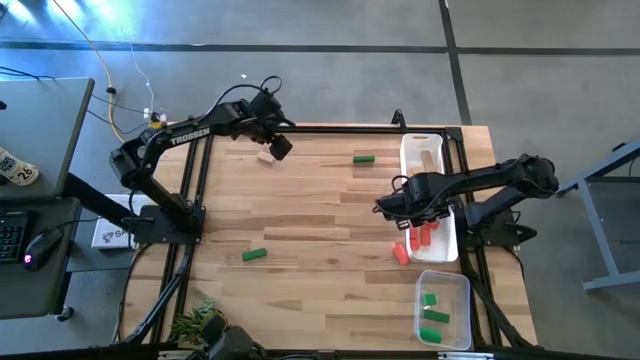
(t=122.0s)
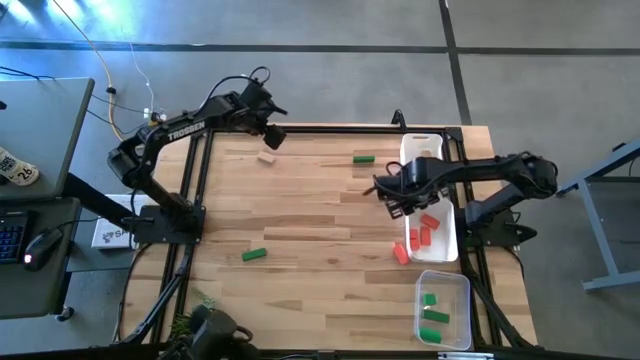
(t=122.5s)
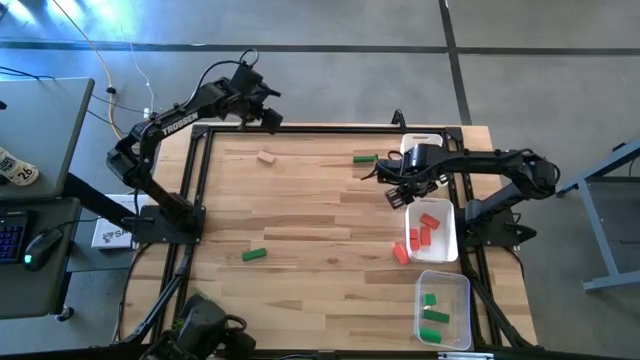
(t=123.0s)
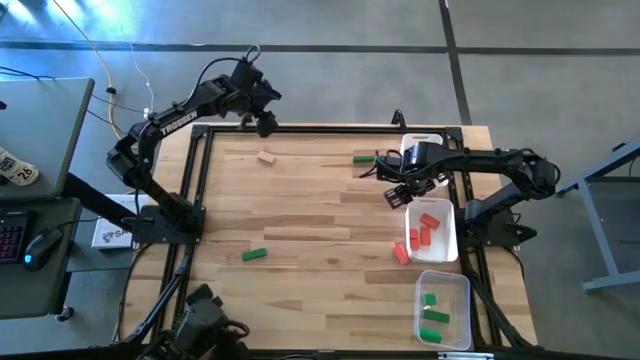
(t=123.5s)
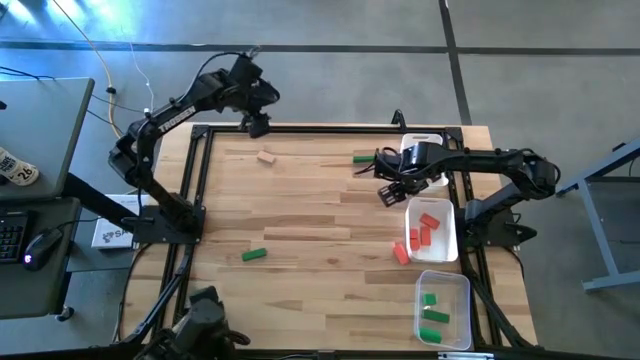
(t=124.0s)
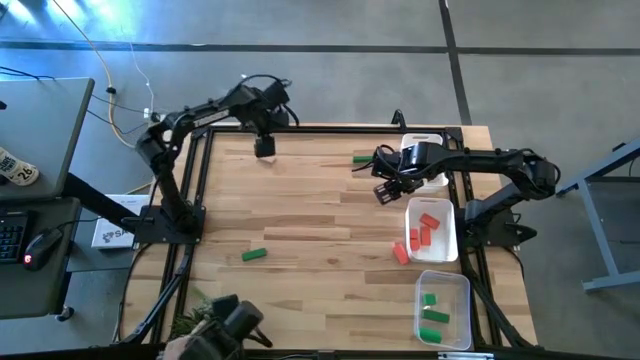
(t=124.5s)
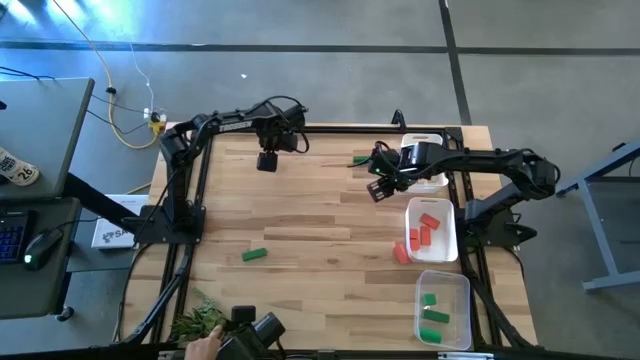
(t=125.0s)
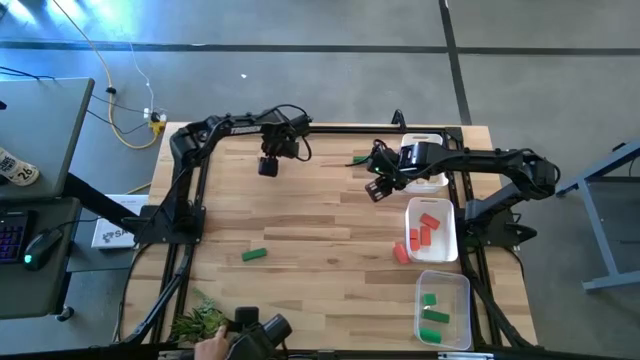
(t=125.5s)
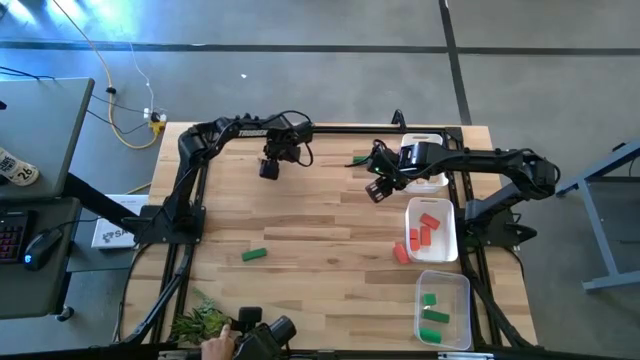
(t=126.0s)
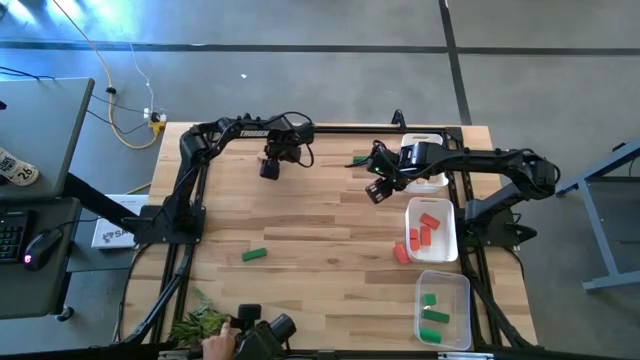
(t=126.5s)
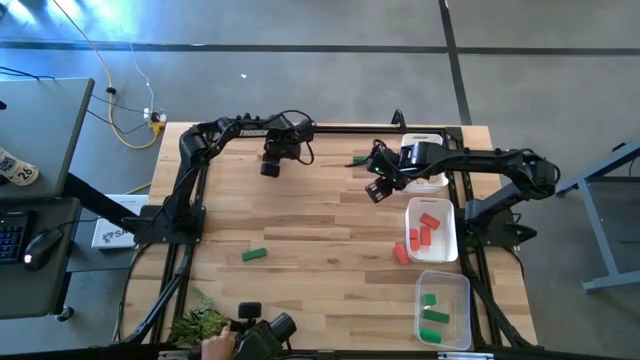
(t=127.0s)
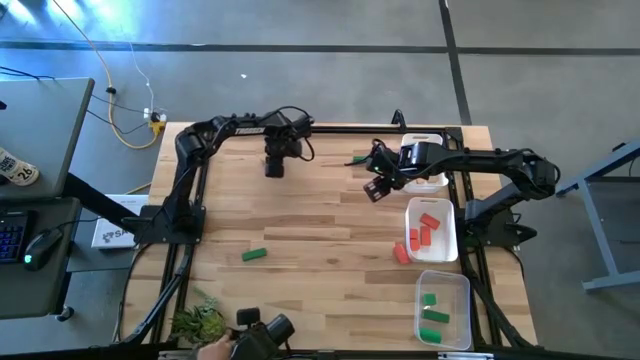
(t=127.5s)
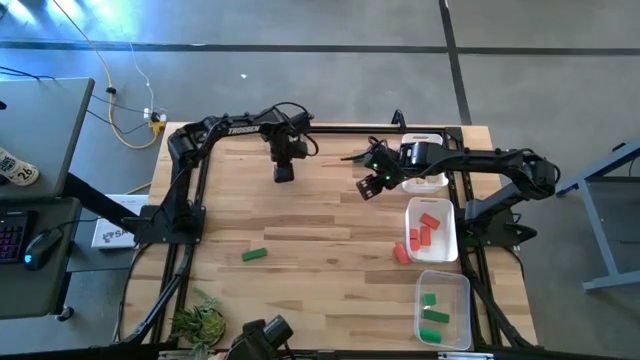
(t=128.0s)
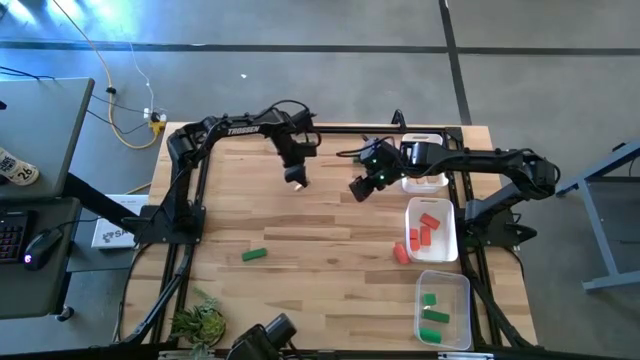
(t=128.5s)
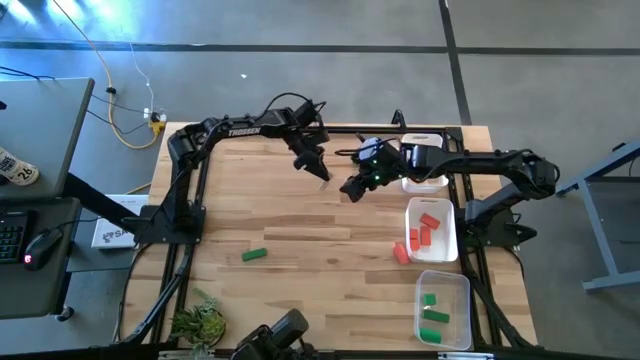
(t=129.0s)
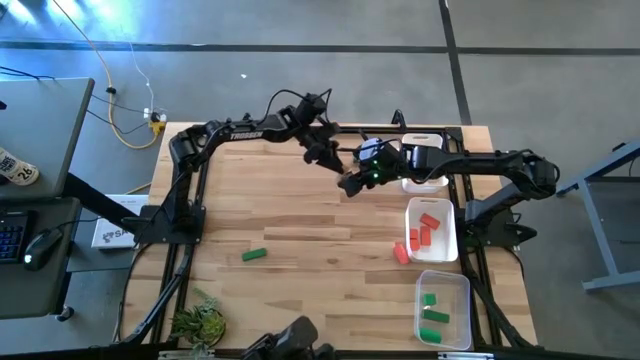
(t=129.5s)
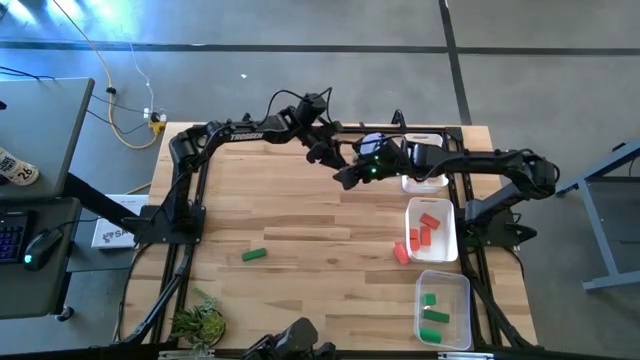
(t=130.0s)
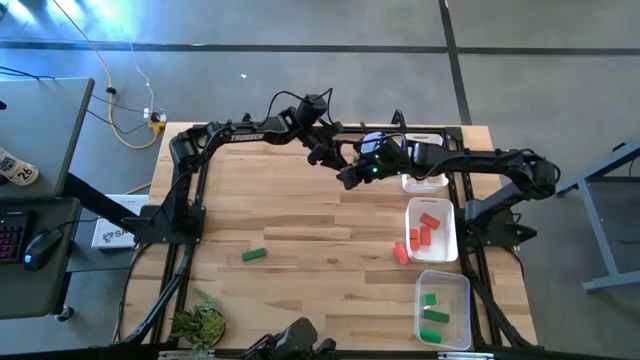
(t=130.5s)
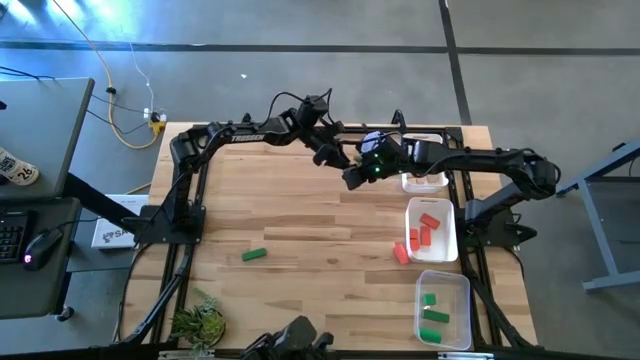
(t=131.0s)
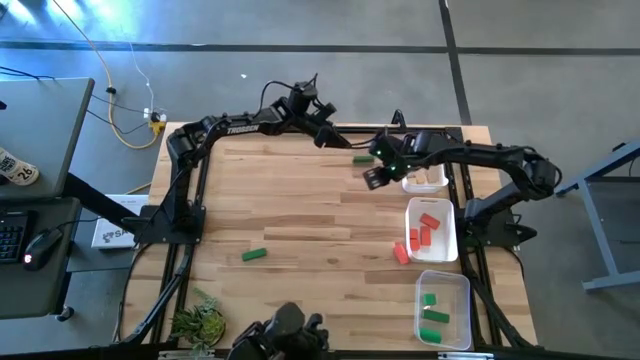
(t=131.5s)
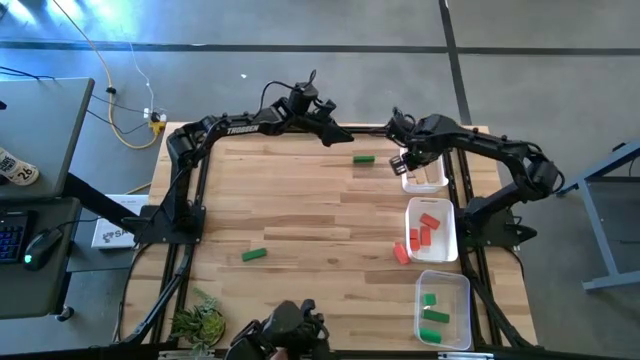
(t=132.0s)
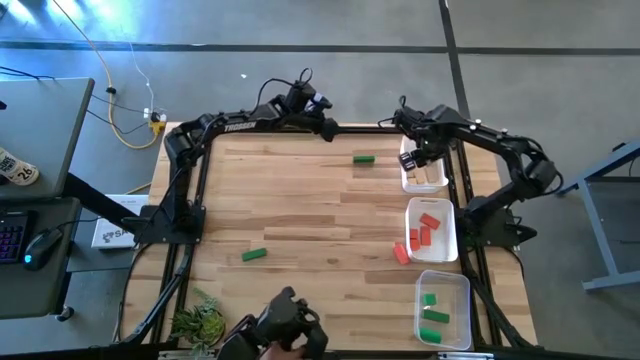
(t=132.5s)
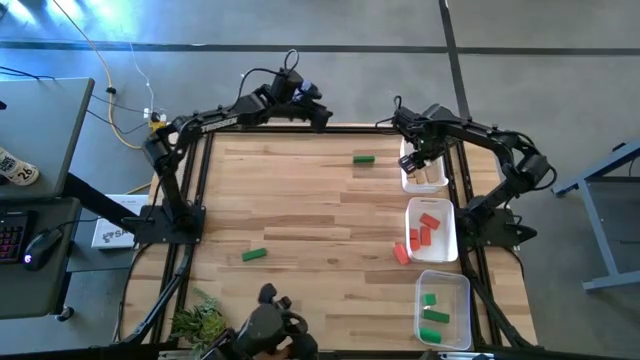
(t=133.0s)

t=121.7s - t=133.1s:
Task: Sort & place blocks by color
Put the brown block into the top white bin

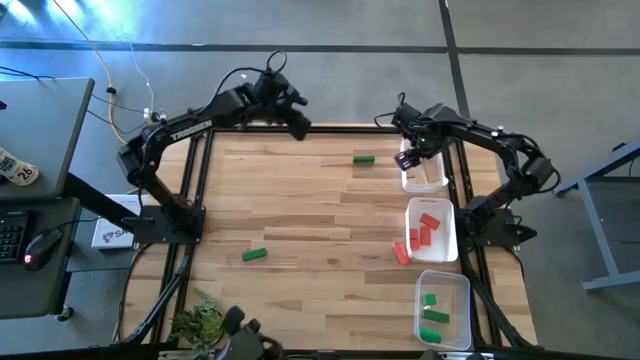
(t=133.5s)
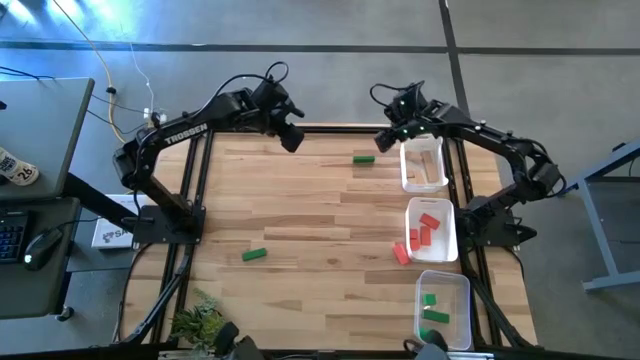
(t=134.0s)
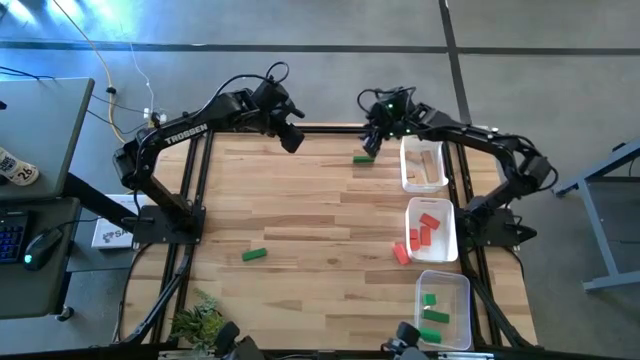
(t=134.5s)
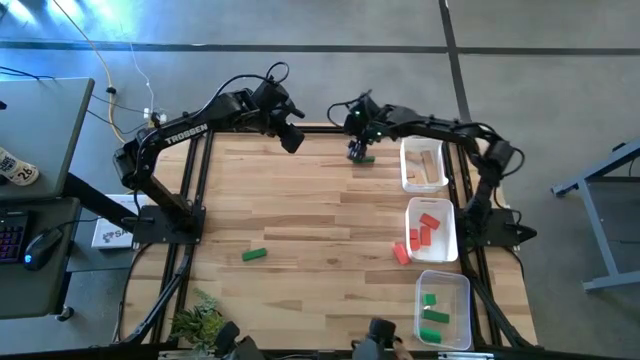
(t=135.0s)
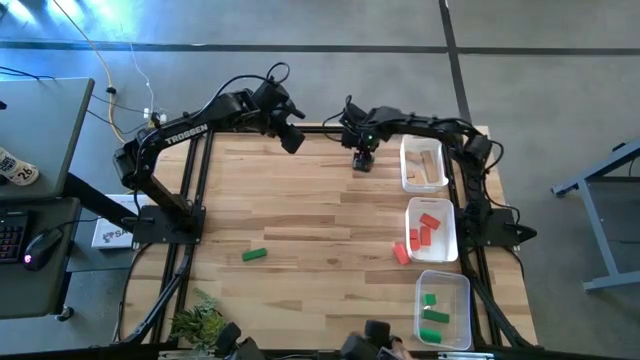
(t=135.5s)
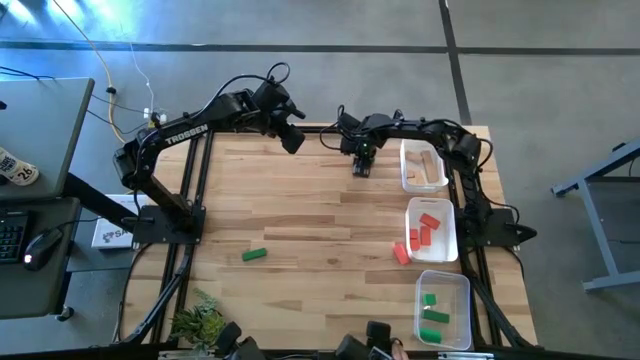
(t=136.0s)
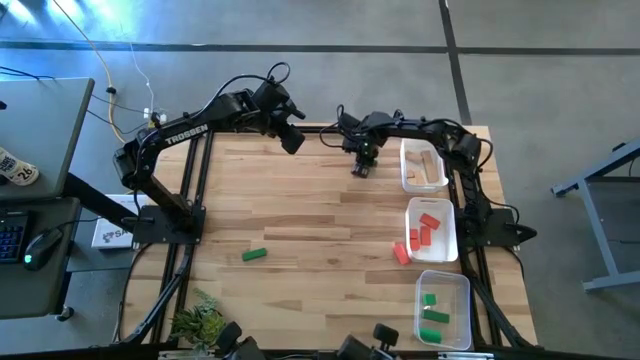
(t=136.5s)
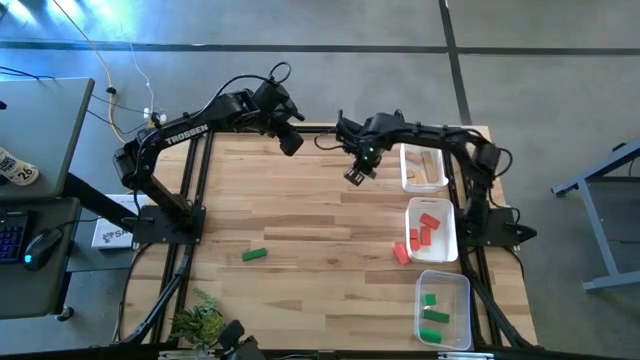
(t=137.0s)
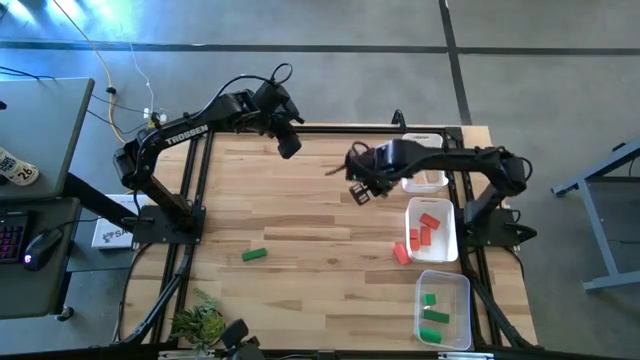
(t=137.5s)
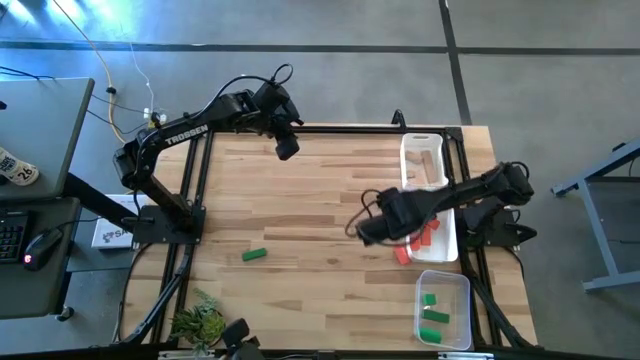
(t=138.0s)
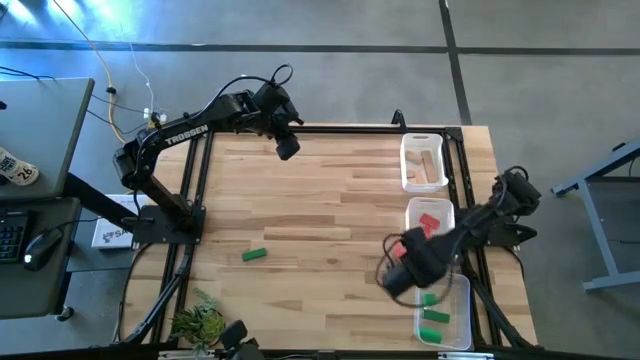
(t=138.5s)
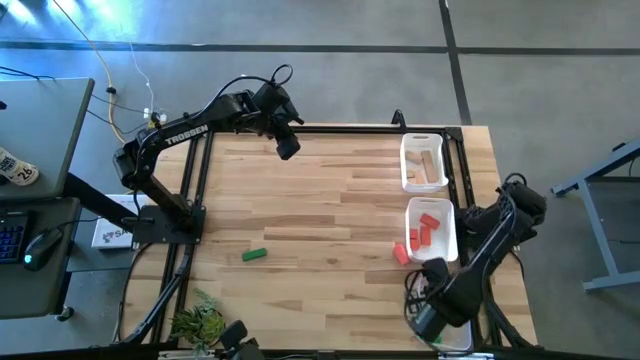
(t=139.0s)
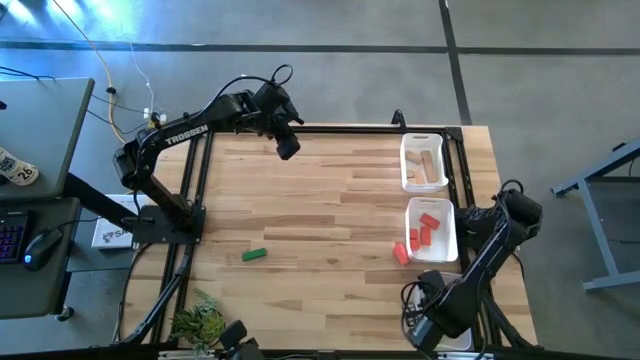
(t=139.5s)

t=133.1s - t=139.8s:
Put the green block into the transparent bin

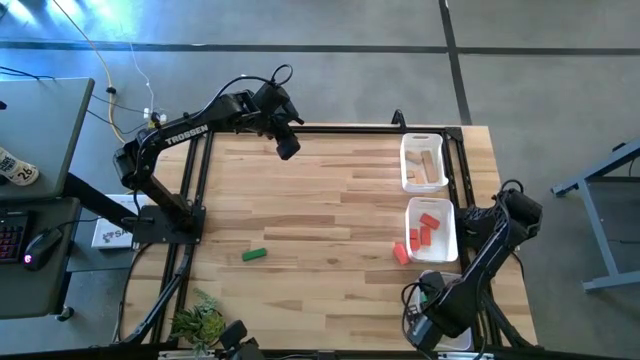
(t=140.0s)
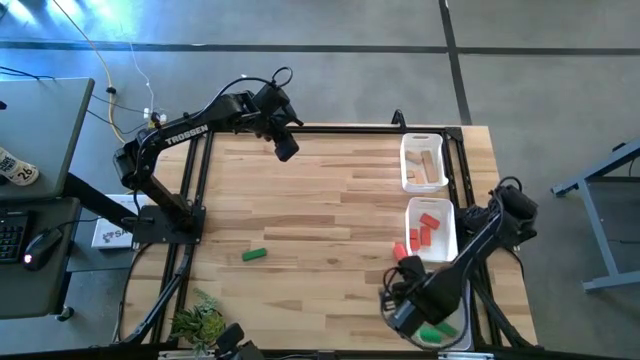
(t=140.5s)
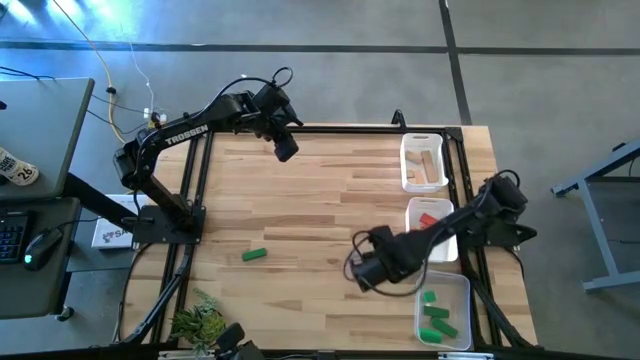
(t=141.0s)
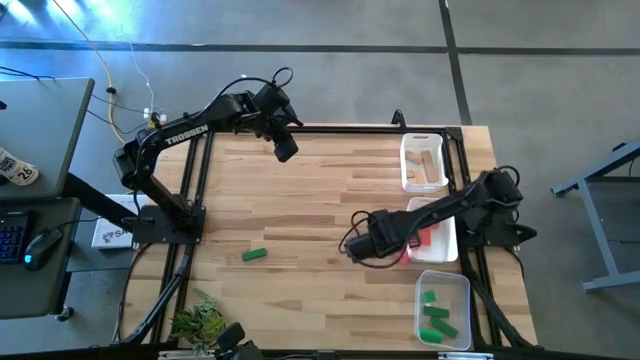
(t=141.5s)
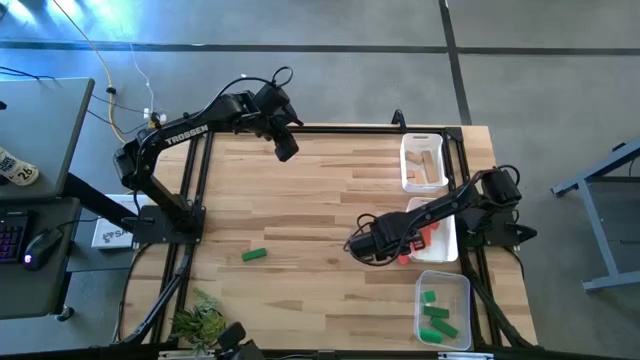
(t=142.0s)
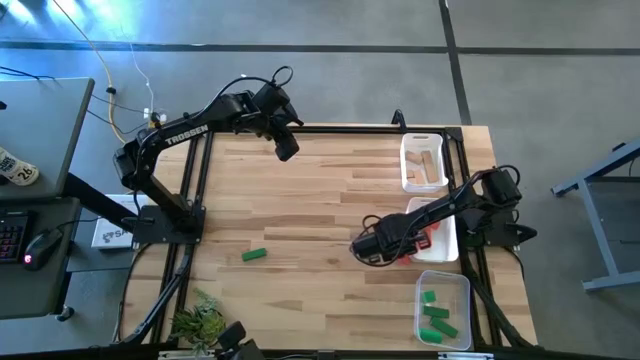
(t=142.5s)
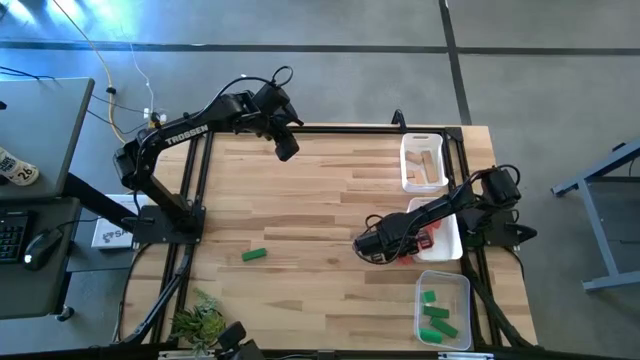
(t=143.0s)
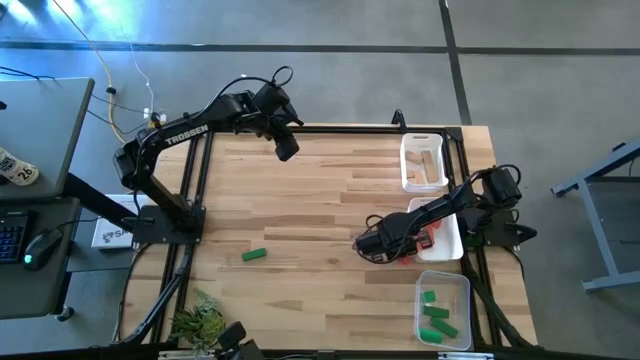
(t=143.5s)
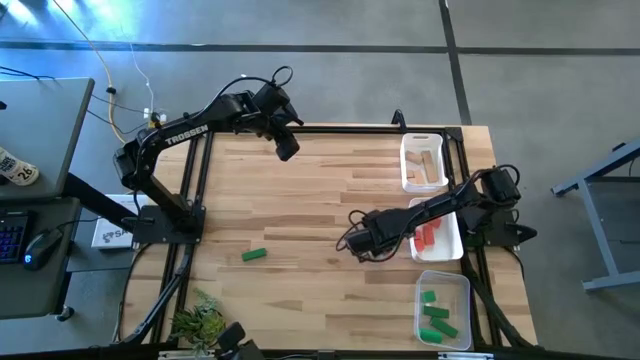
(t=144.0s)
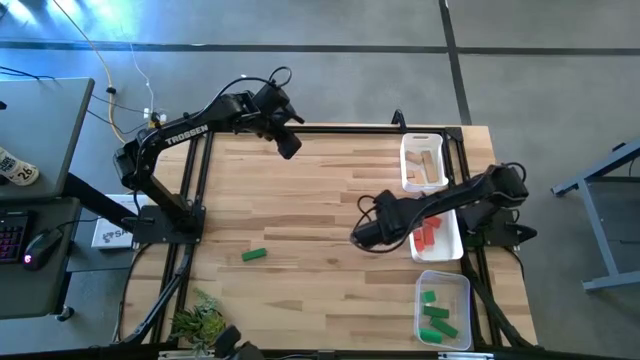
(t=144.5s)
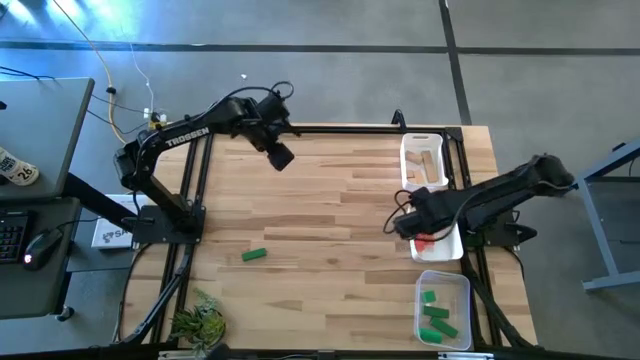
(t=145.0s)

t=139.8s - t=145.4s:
Put the orange block into the bottom white bin
